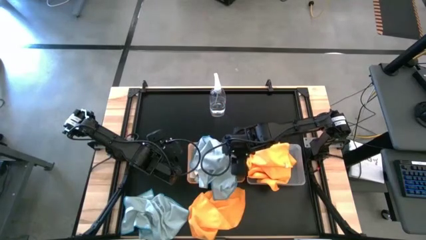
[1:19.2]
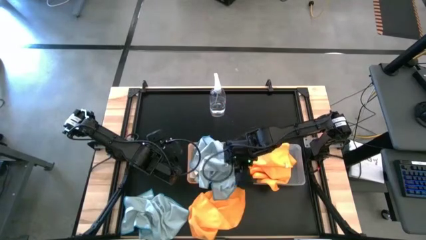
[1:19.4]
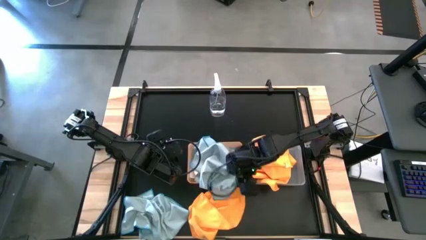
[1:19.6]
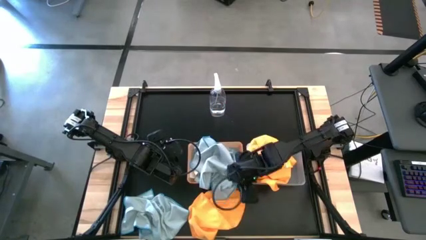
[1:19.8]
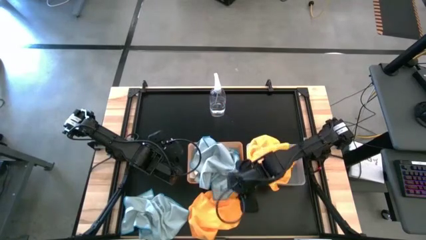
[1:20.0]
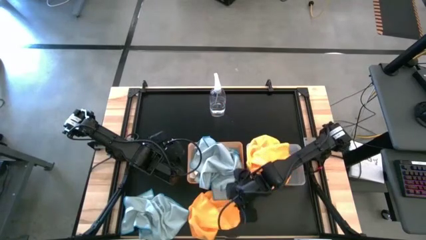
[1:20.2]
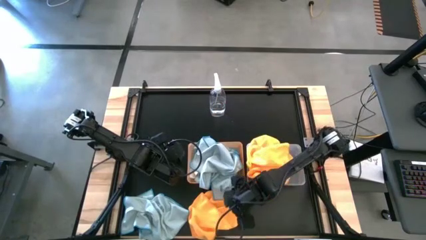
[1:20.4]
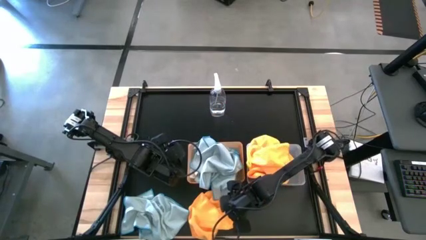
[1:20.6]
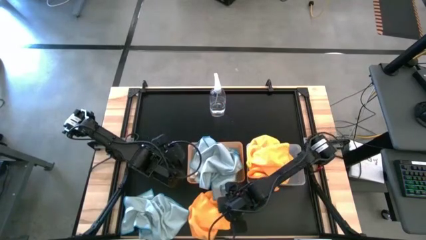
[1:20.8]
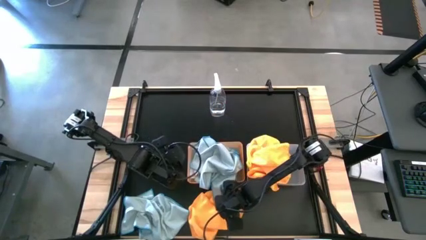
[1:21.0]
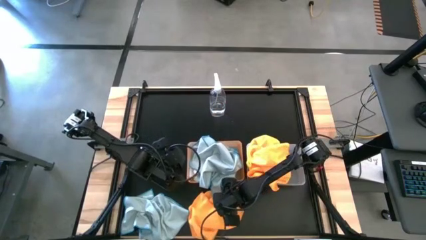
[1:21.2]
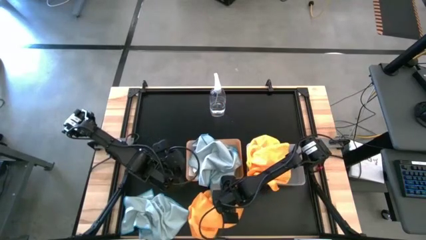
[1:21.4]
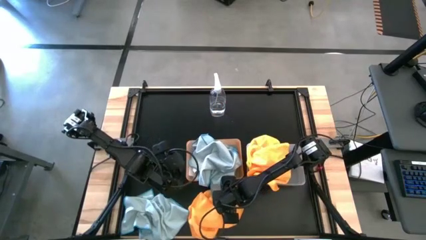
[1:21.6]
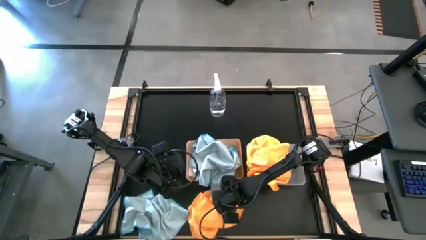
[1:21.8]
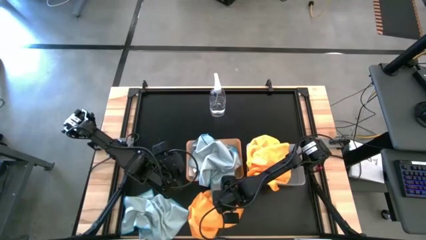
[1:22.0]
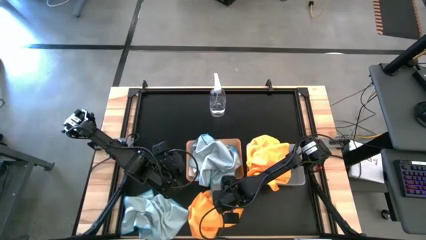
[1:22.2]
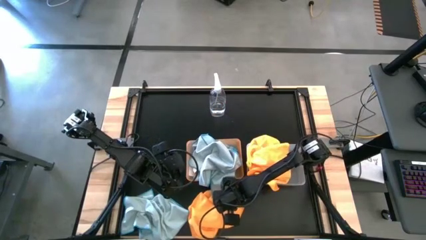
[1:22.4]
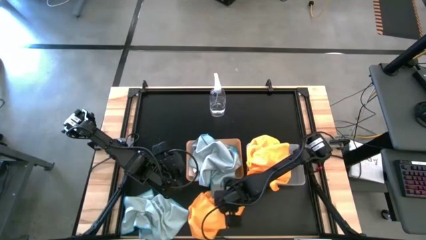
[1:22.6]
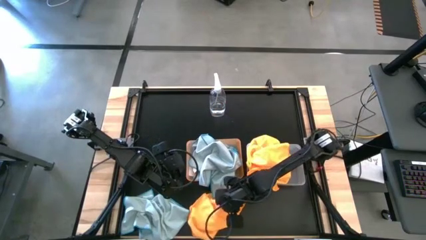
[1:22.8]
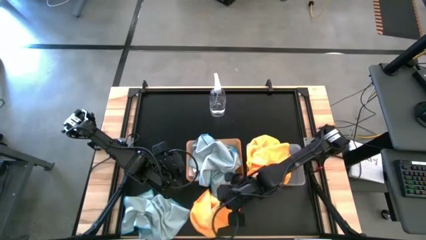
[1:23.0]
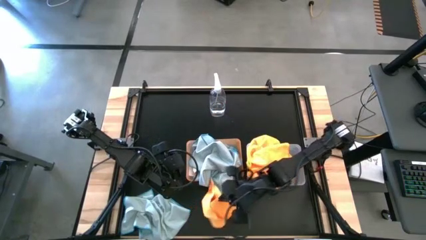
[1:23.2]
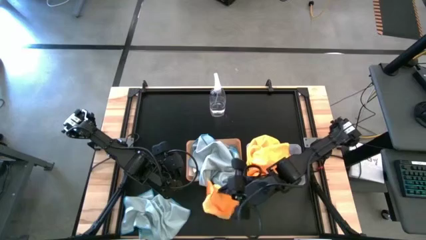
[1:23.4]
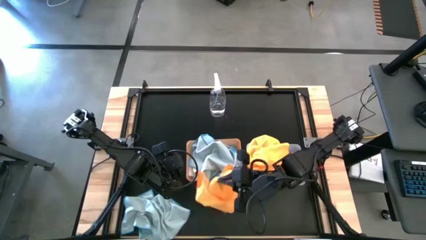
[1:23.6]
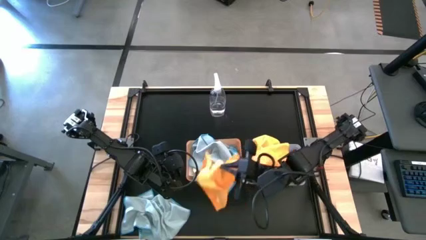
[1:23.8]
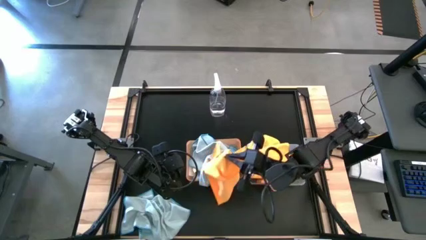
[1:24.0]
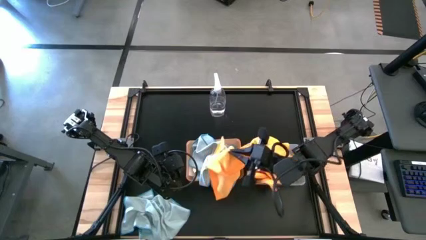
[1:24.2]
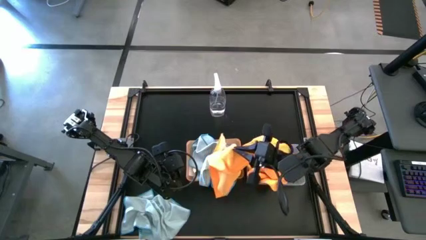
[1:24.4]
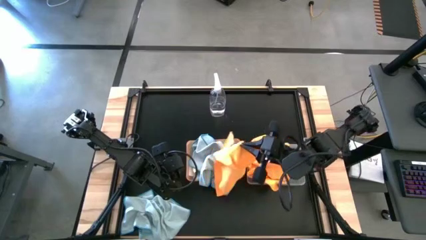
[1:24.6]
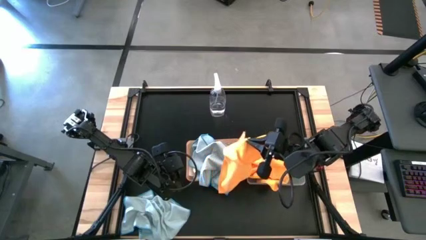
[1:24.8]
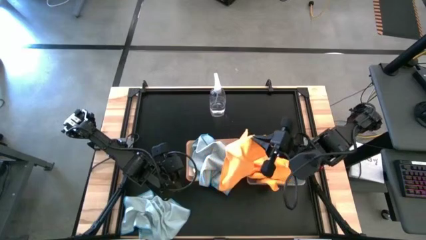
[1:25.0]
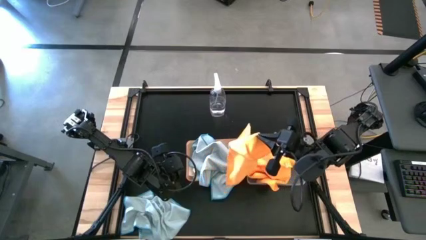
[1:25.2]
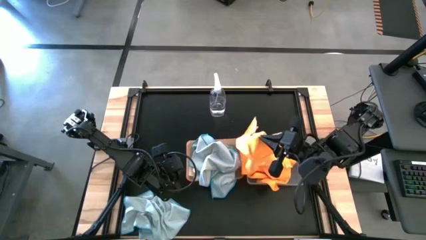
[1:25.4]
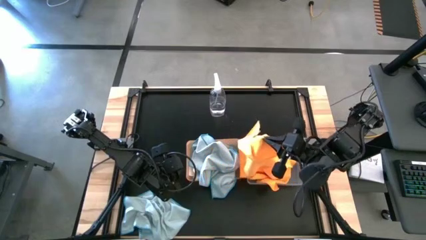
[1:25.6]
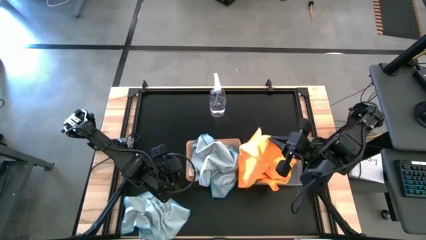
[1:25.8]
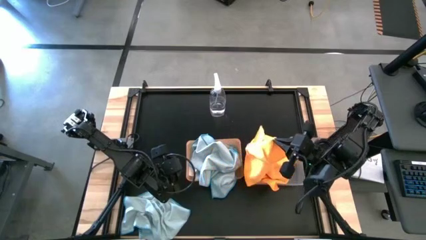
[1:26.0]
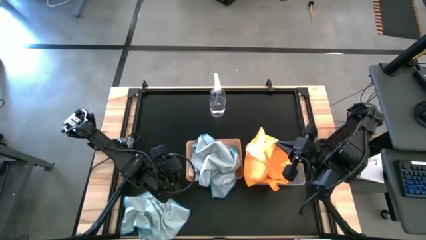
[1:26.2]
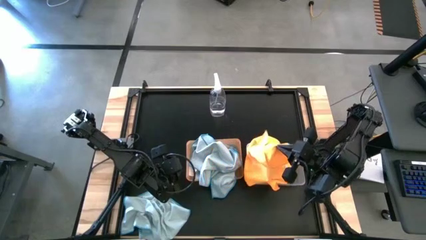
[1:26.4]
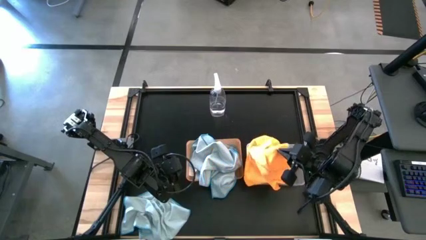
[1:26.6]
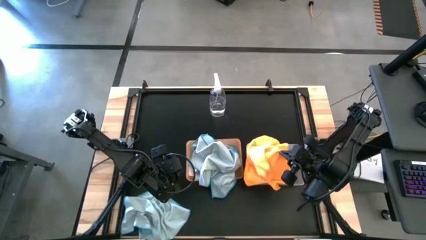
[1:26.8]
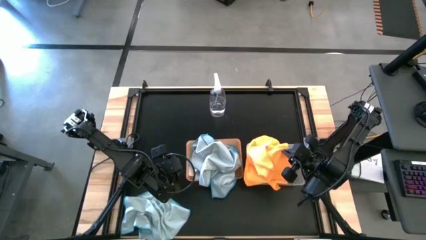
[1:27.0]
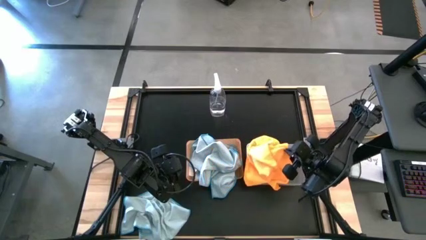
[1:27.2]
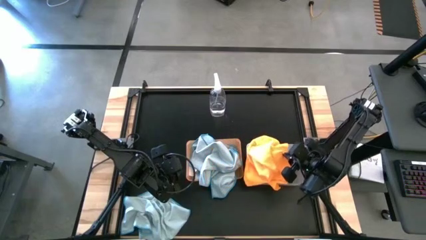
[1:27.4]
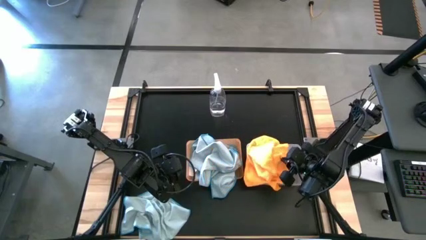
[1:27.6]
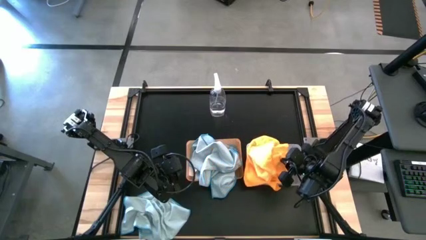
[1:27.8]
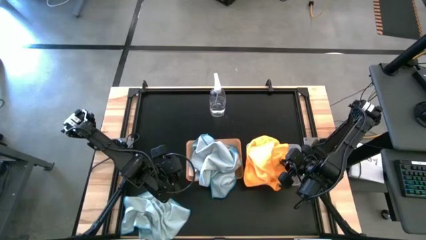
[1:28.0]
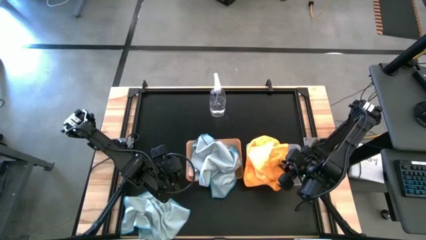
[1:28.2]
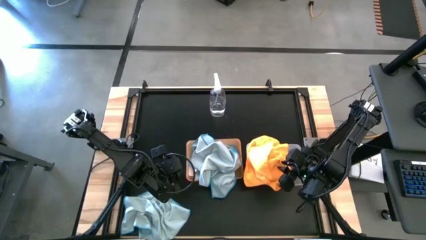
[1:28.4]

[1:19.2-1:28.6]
Task: Sort microfiber towel by color & place in baskets
Put the orange towel into the transparent bin

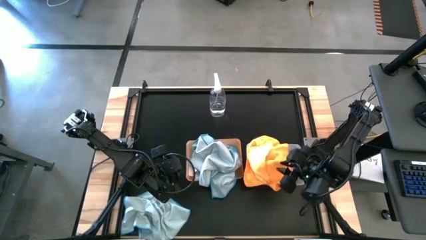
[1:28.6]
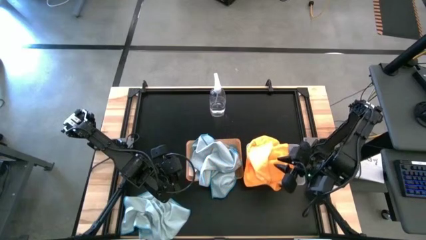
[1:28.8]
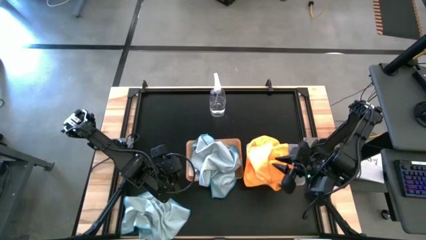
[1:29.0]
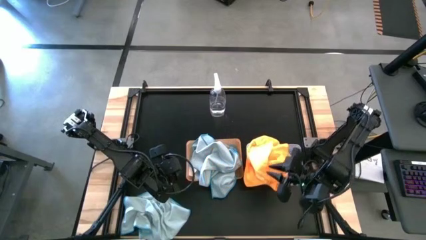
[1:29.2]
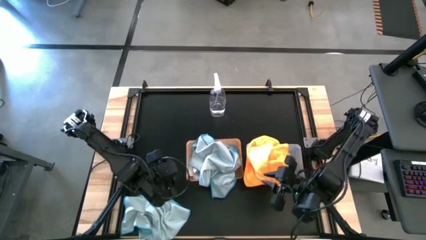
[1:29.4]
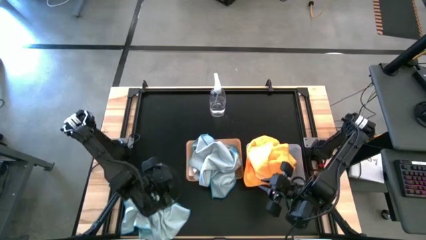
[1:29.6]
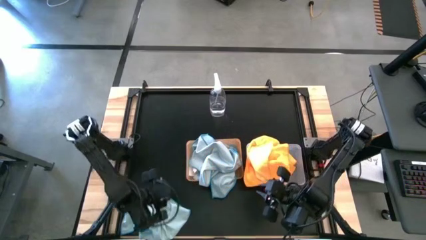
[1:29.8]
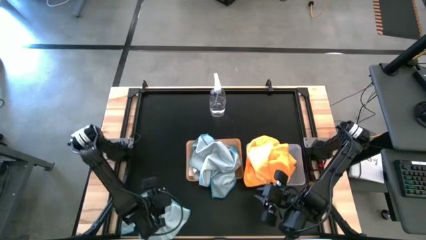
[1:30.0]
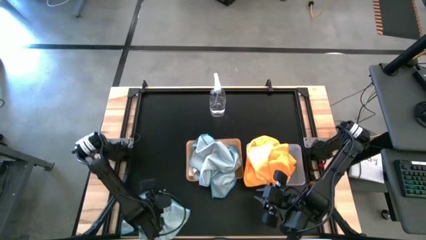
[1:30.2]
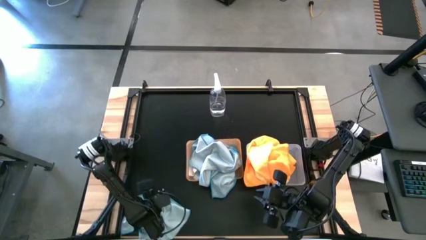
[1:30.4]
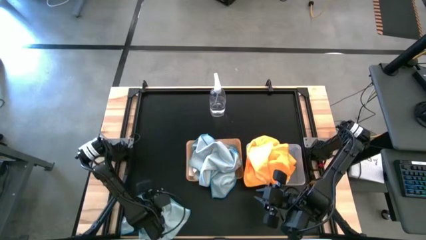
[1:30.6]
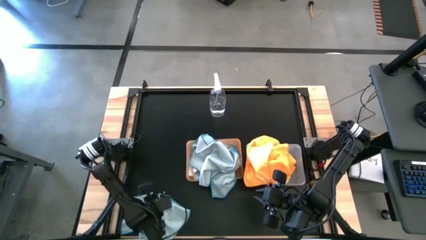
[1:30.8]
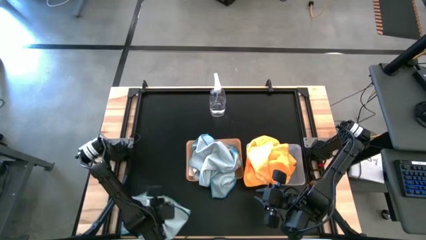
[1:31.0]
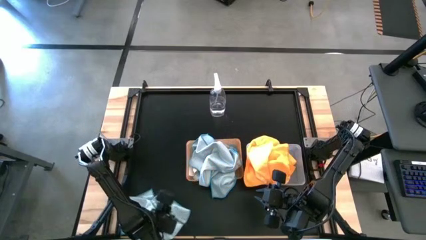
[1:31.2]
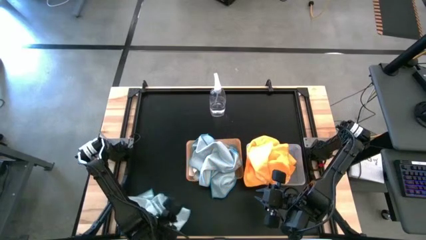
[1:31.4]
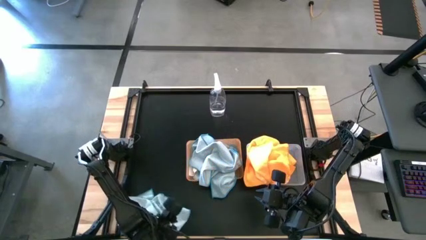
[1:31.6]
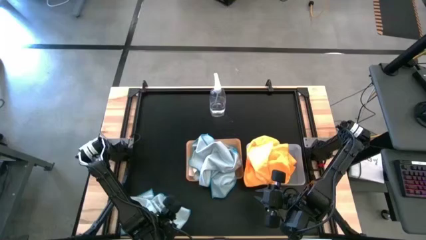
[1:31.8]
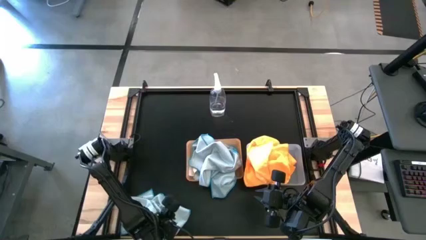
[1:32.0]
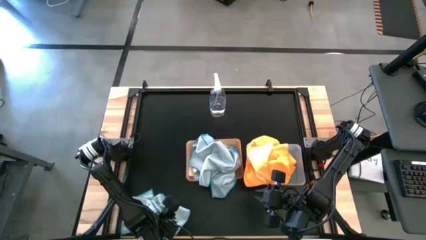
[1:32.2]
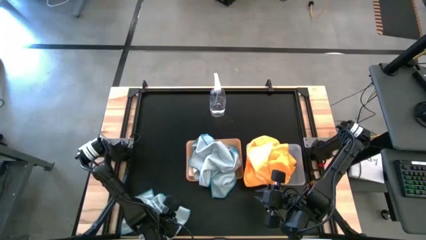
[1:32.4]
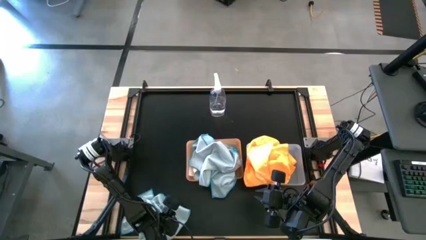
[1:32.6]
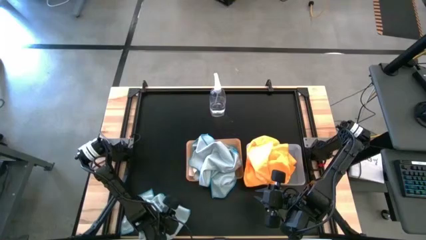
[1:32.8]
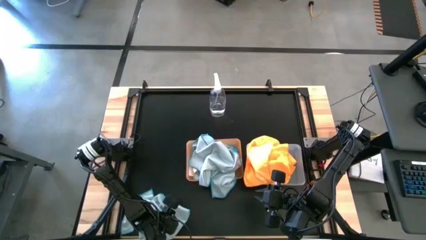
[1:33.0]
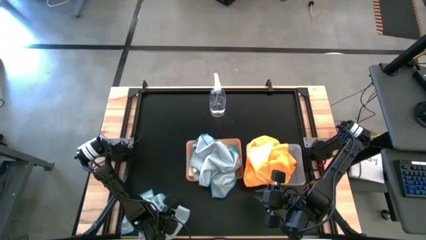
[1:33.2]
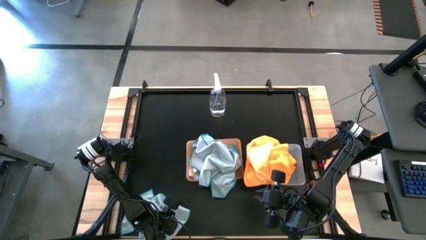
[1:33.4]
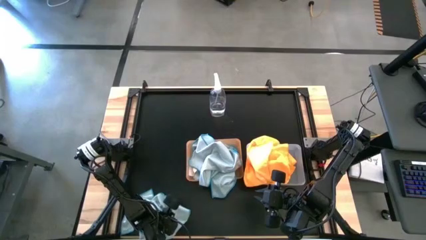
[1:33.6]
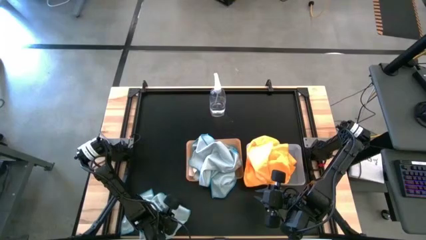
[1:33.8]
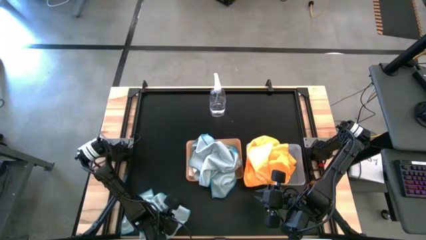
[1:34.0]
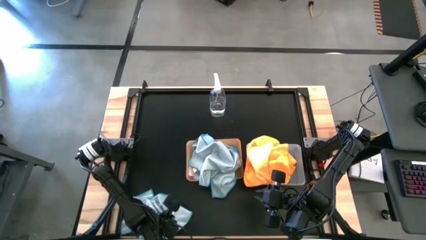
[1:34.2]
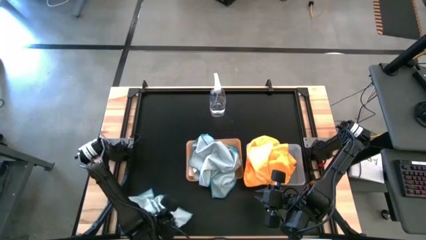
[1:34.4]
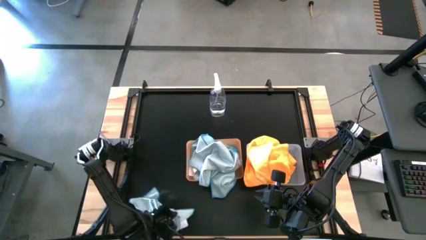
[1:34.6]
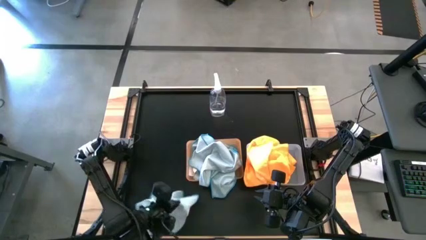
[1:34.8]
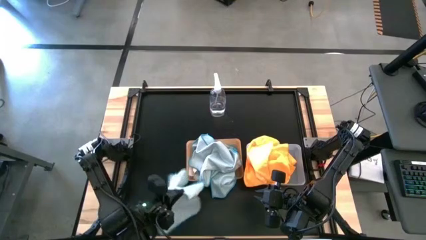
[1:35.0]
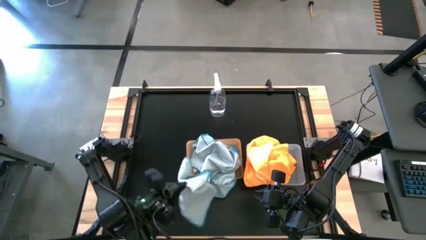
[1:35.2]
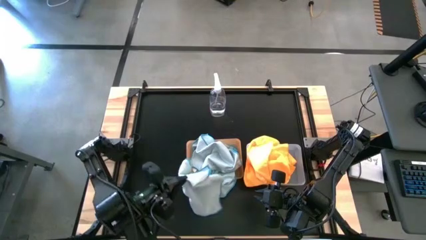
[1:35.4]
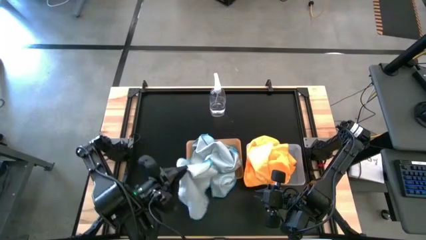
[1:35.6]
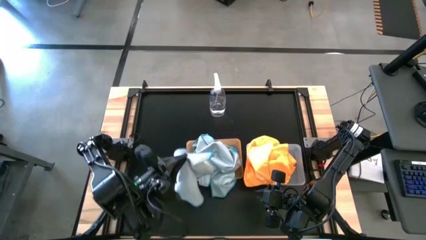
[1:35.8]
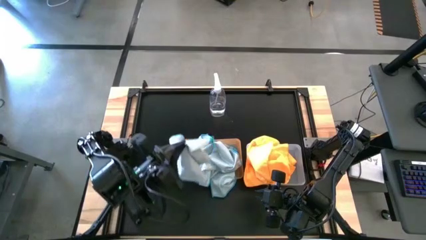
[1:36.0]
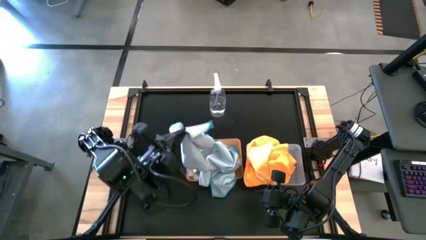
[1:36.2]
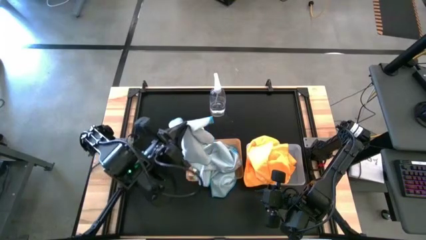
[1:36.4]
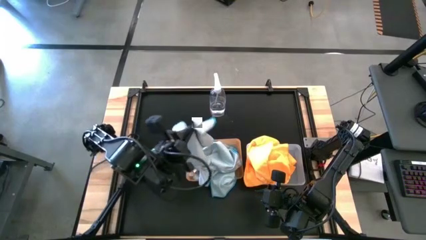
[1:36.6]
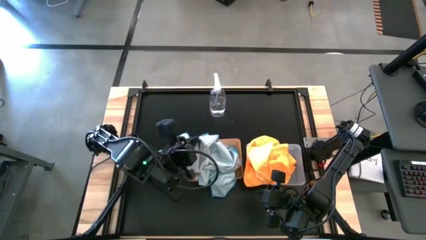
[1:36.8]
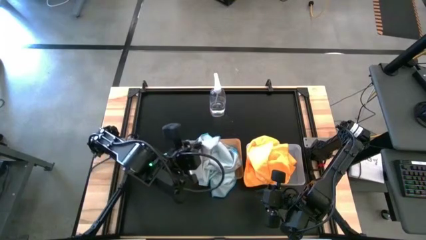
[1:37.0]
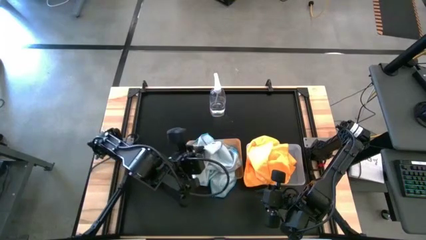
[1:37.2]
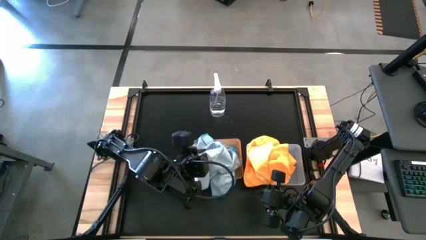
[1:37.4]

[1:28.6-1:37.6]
Put the blue towel into the orange bin
